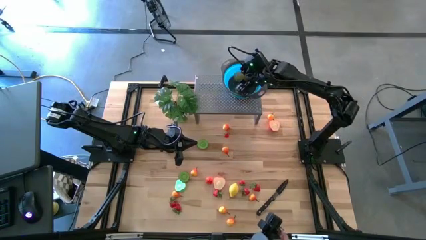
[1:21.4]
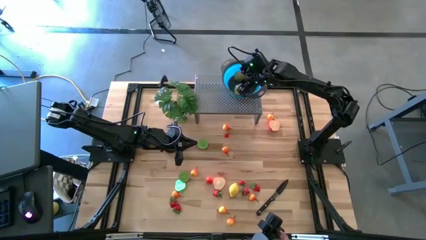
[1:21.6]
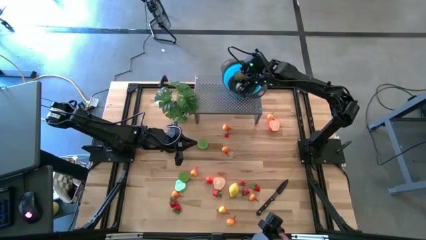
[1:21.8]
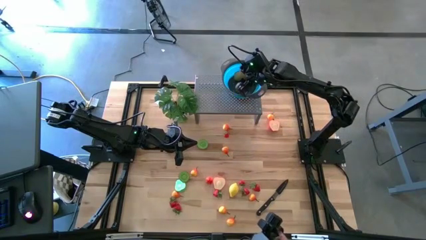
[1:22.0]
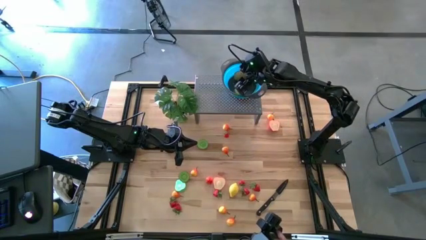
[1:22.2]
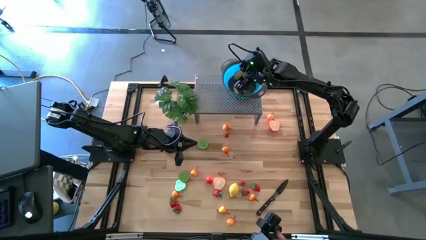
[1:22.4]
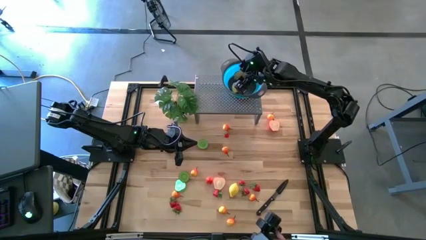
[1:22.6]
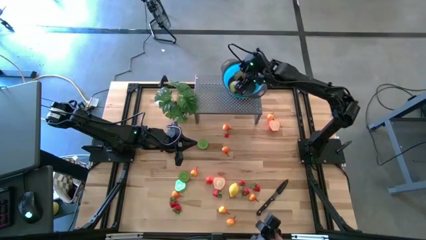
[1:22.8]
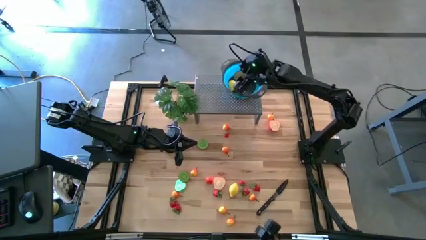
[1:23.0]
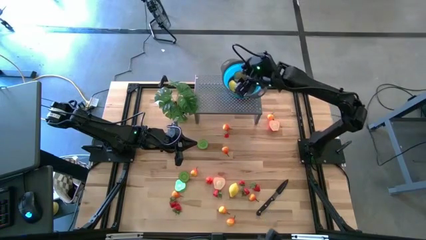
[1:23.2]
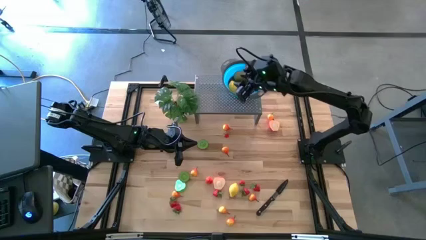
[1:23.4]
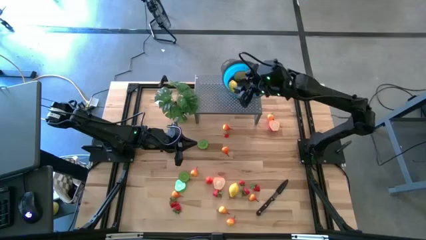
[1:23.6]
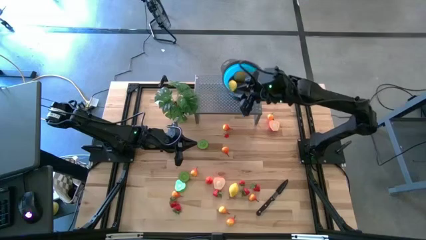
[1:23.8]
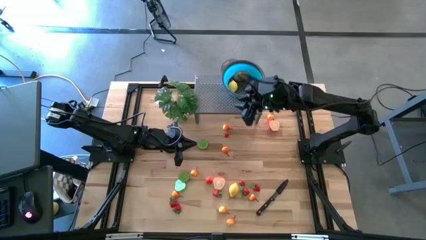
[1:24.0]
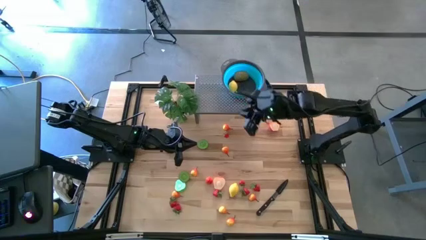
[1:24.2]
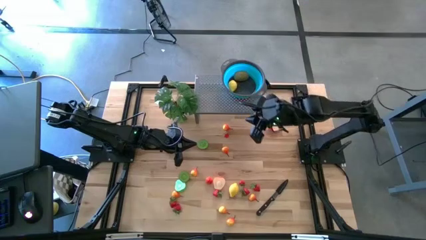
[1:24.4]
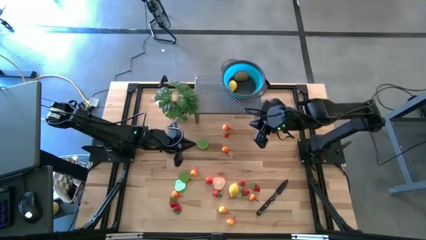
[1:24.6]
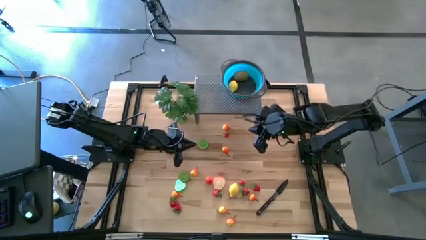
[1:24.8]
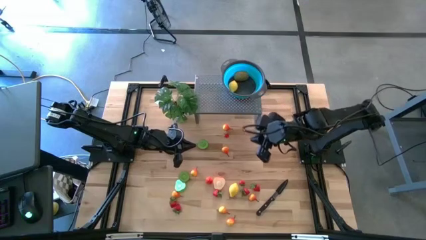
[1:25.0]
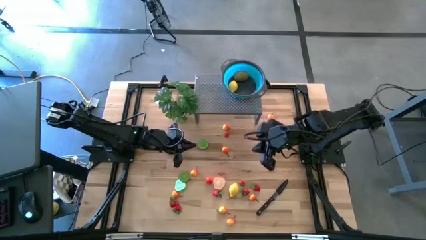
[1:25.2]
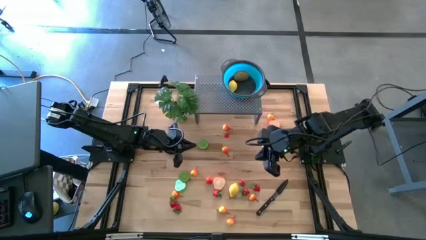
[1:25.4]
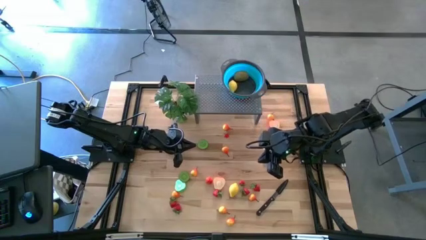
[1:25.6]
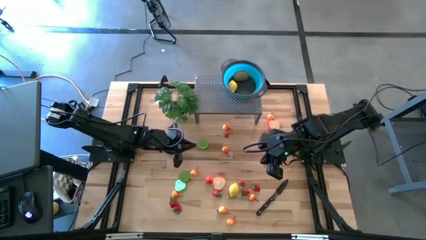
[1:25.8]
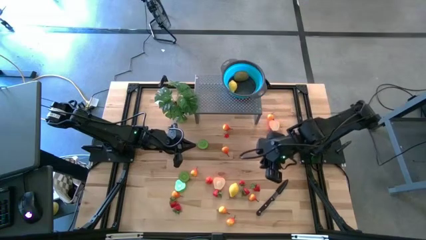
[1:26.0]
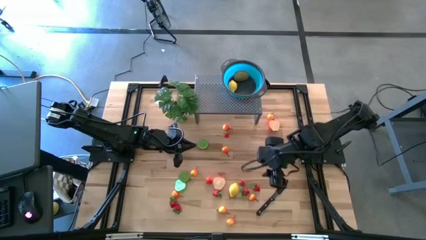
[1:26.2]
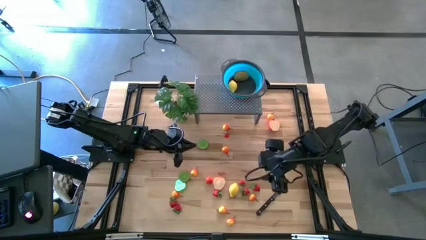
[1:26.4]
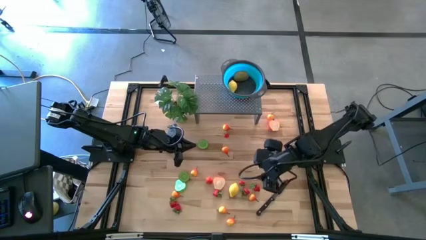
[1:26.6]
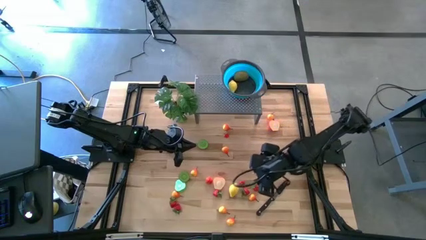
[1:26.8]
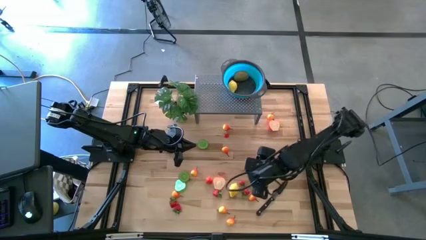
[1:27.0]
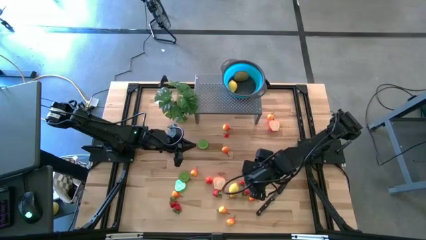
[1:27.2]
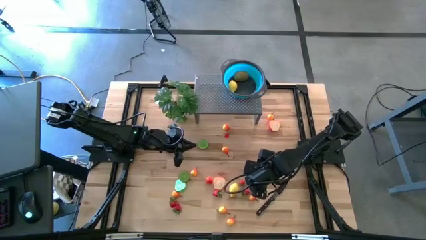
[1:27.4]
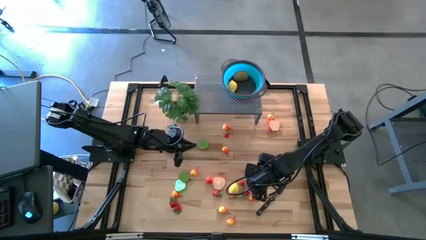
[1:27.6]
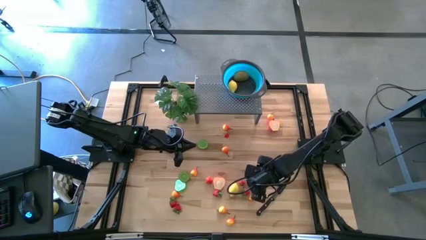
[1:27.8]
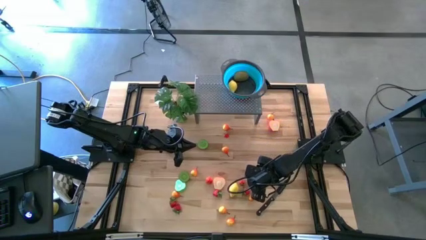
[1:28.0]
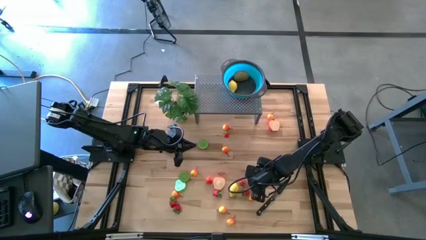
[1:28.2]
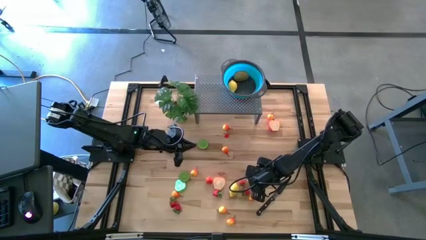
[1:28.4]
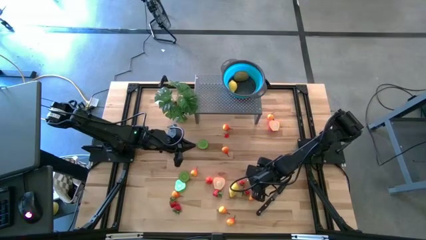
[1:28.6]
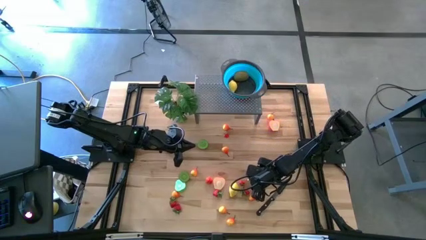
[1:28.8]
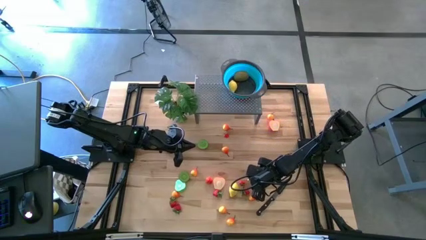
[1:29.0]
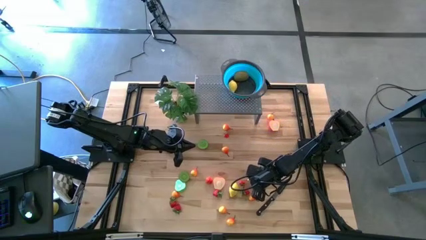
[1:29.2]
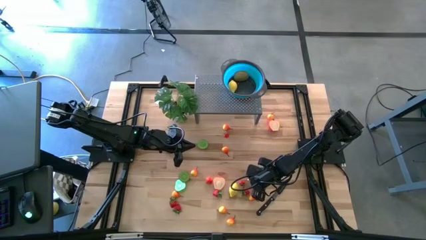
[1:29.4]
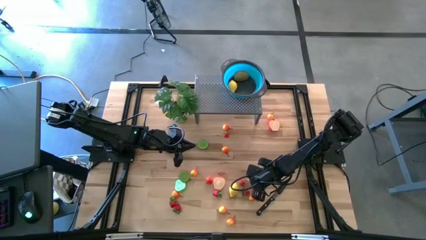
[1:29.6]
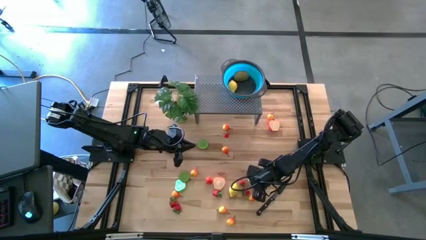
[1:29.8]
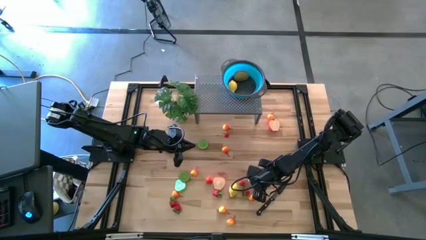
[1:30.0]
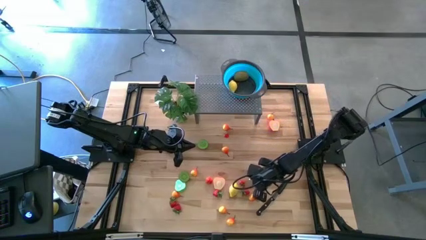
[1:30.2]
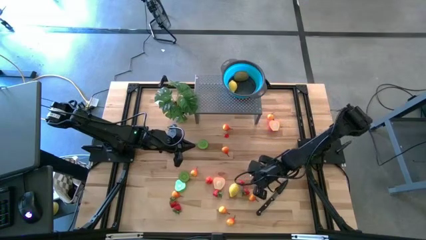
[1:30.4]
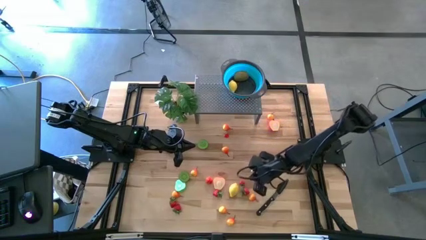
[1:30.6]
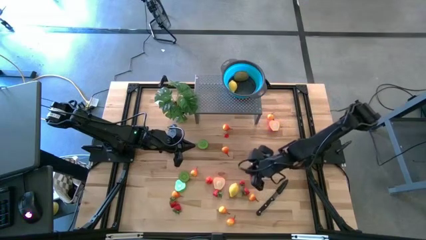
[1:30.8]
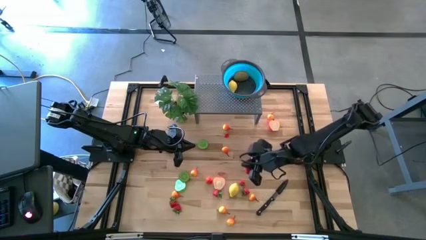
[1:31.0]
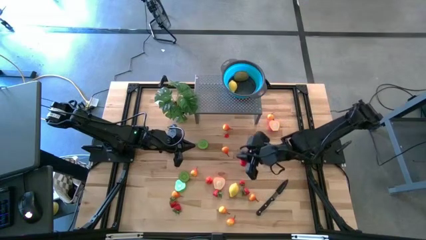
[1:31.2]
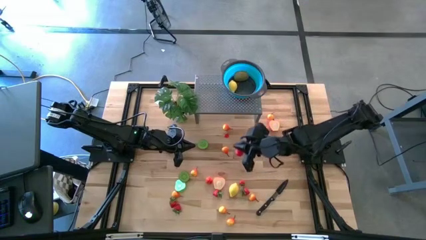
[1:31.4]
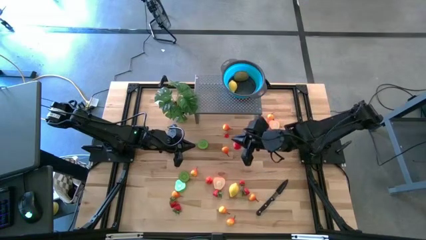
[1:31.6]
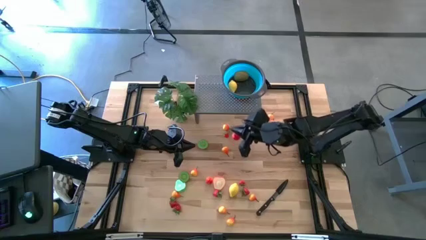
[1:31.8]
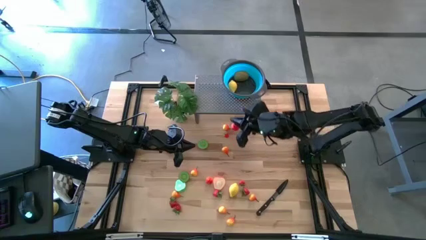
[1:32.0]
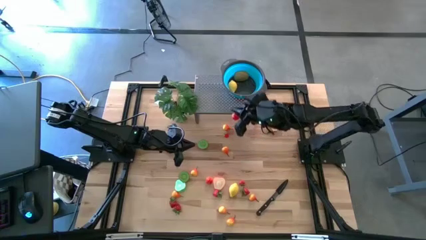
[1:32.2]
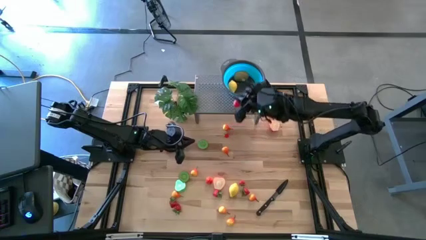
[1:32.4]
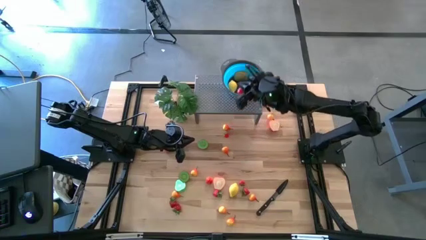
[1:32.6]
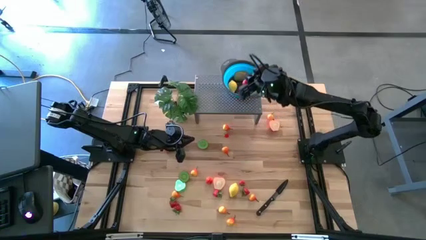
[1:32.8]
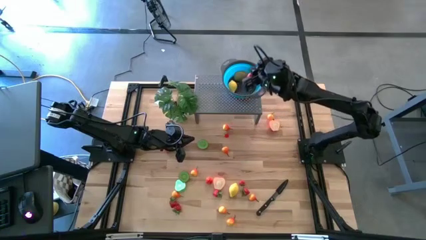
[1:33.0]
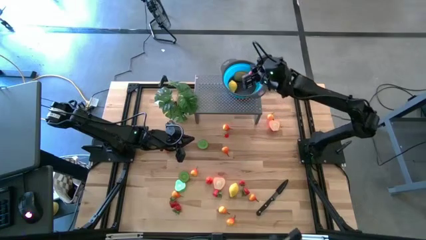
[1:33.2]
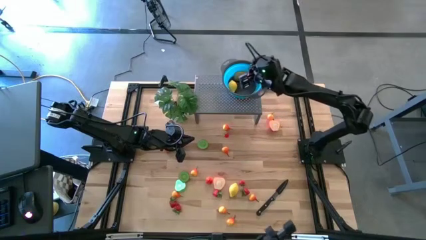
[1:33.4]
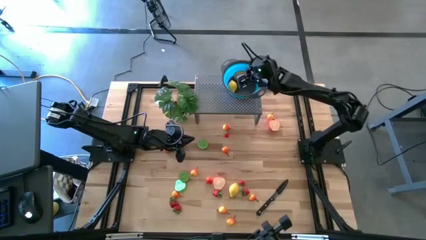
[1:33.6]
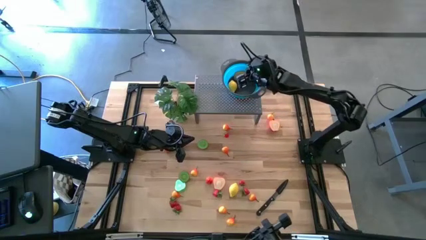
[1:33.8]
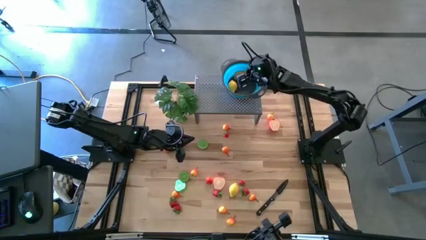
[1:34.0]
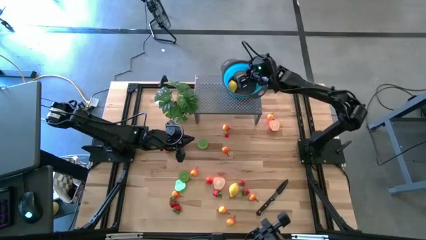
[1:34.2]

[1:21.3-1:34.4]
Task: Pick & Place Fruit
Put the red strawberry in the blue bowl on the shelf

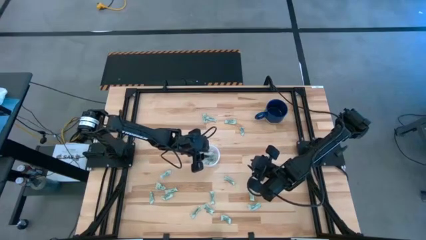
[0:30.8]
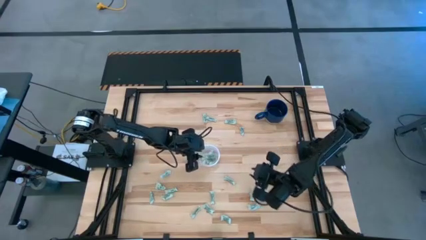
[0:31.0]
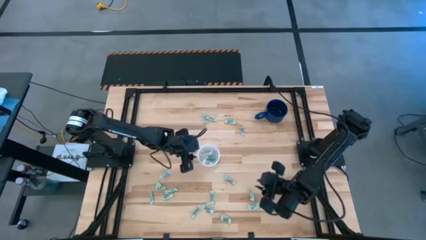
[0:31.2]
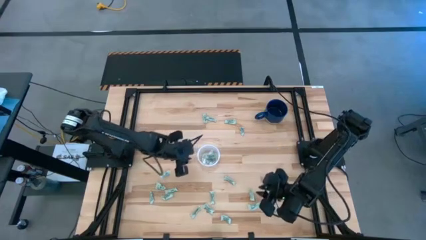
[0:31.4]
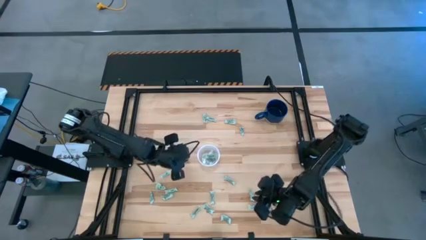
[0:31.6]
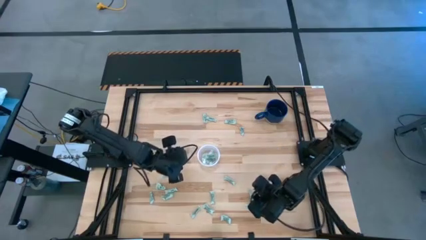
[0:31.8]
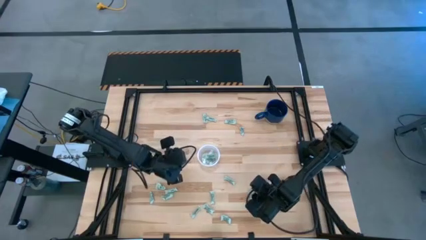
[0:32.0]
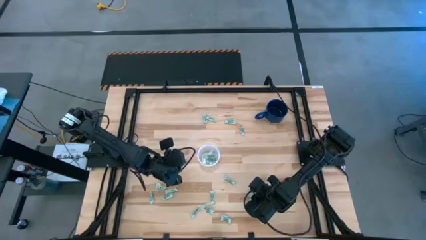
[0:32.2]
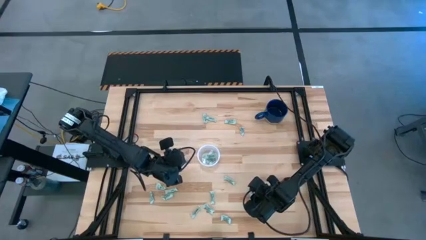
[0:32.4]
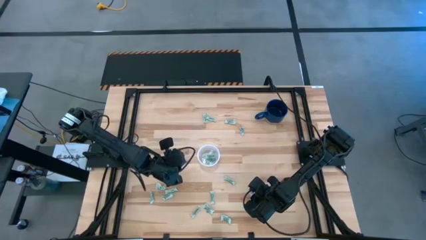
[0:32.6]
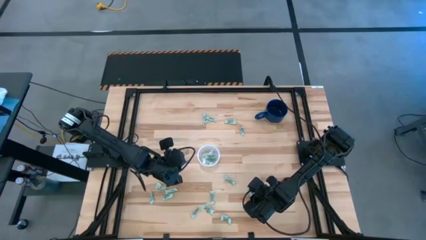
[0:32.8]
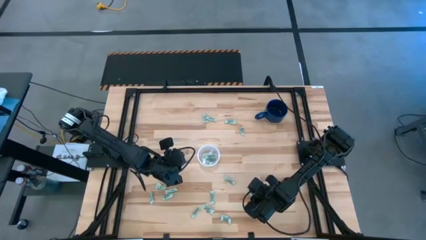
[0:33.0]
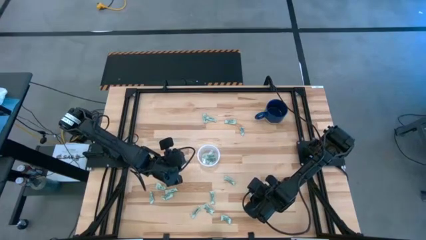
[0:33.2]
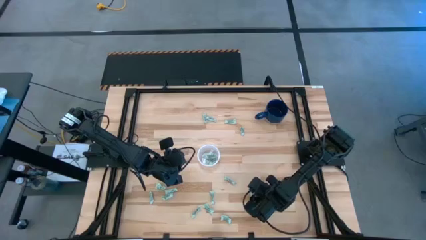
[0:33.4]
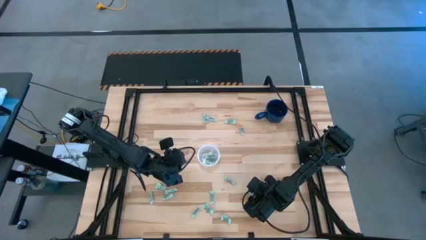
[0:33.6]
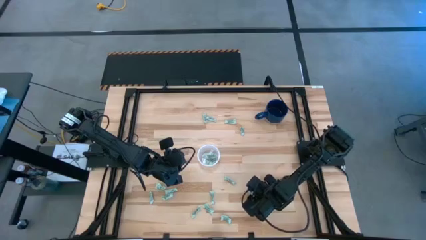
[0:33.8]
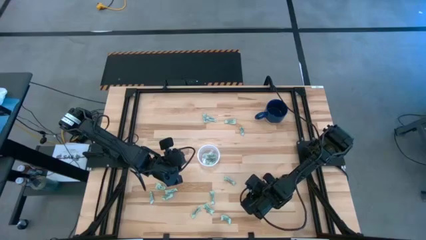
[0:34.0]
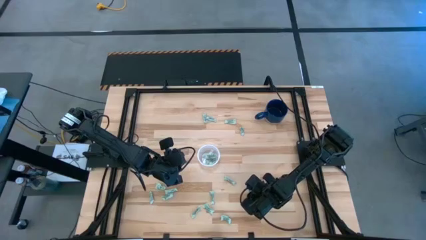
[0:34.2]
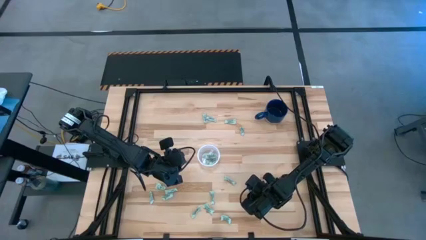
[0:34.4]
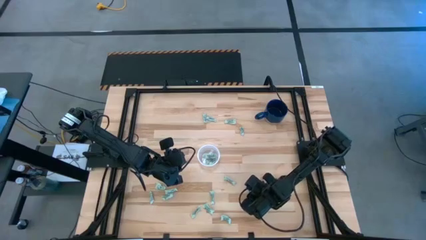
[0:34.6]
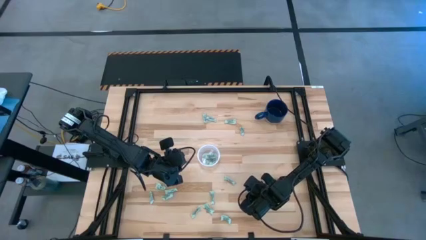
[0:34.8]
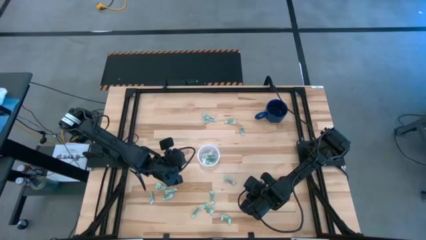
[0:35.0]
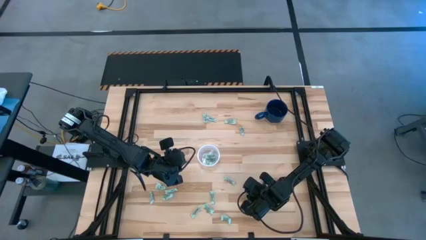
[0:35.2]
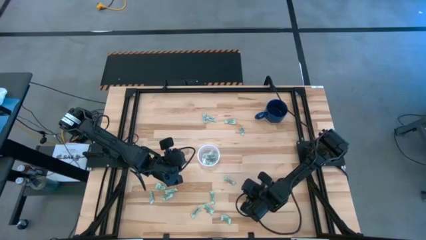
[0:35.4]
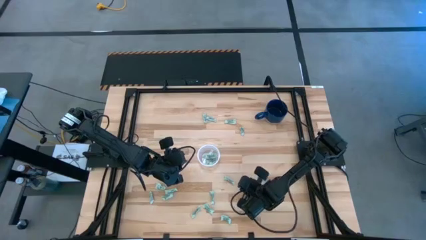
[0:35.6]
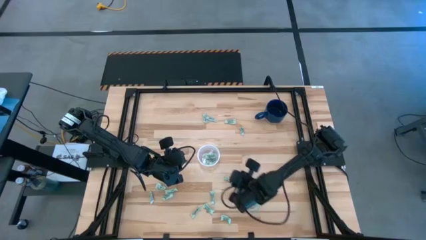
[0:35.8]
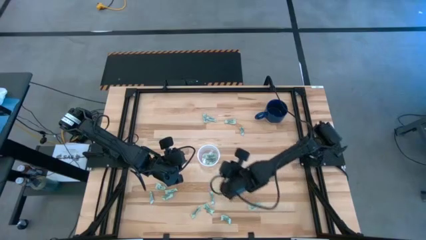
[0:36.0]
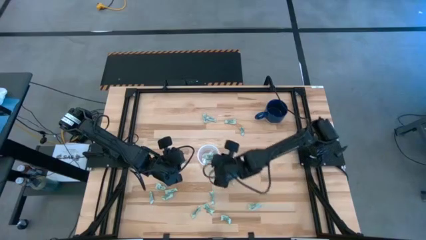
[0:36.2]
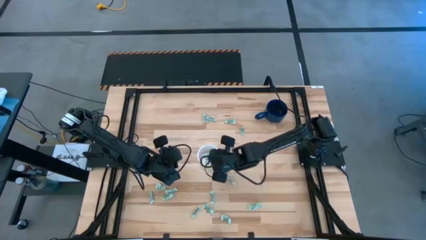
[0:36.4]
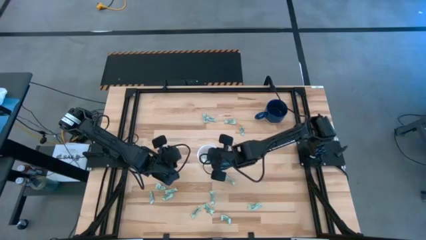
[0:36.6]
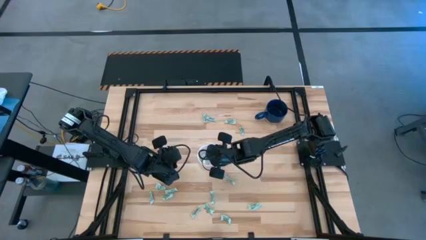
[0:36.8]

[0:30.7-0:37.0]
Task: Pick and place items into bin
Put the stevia packet into the transparent bin
